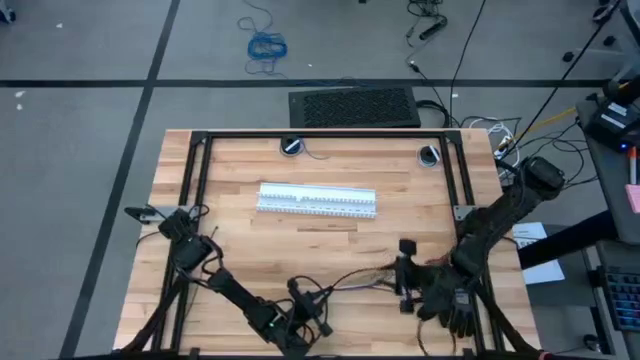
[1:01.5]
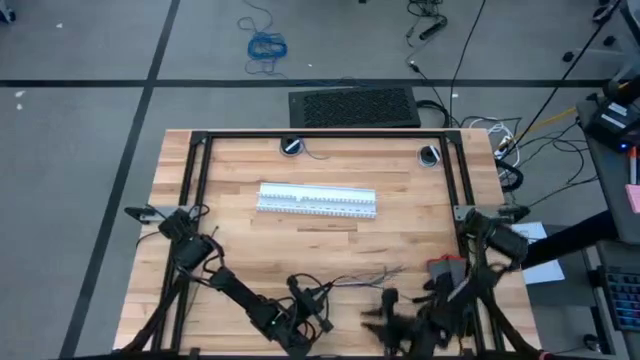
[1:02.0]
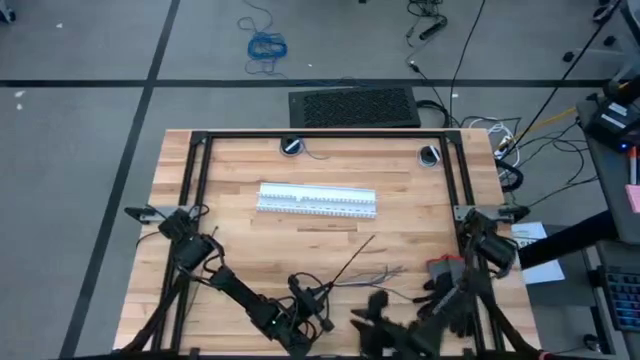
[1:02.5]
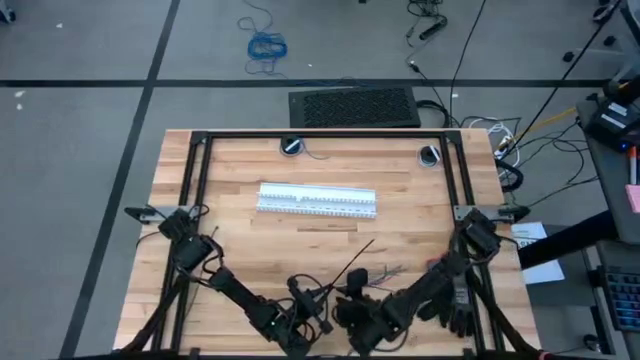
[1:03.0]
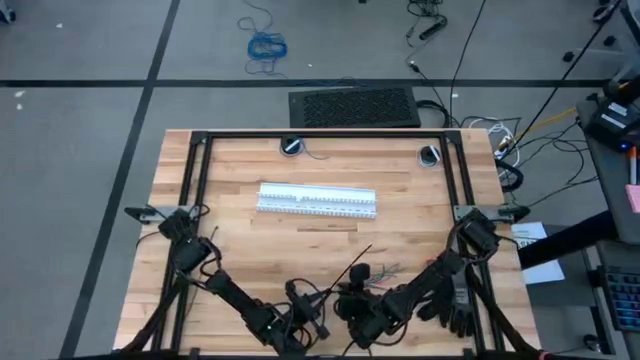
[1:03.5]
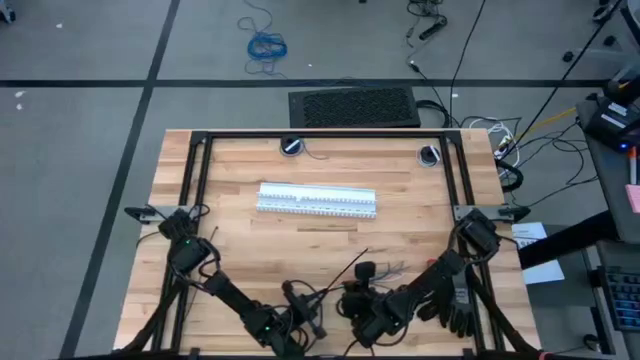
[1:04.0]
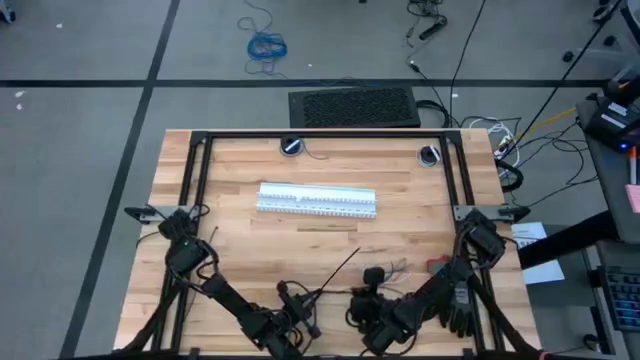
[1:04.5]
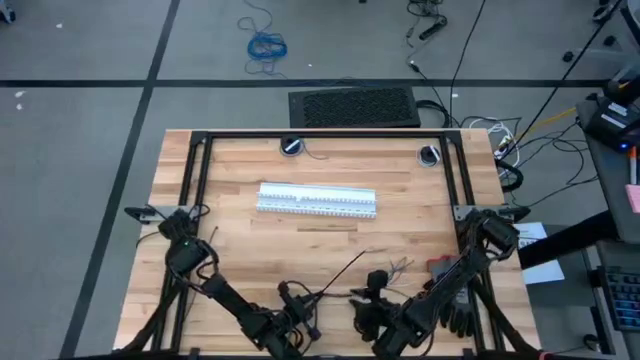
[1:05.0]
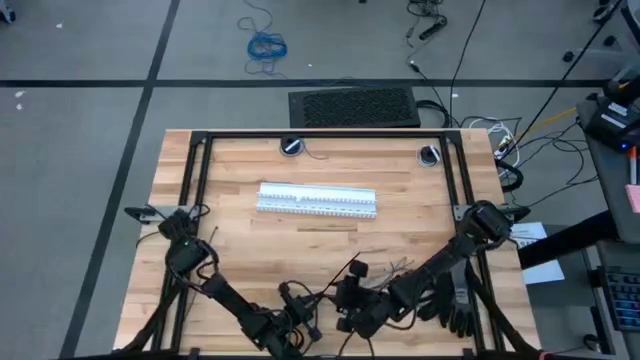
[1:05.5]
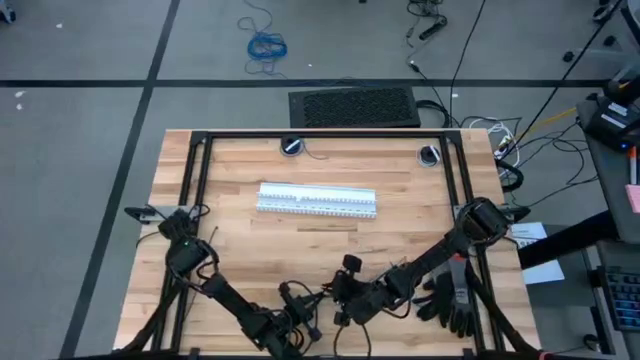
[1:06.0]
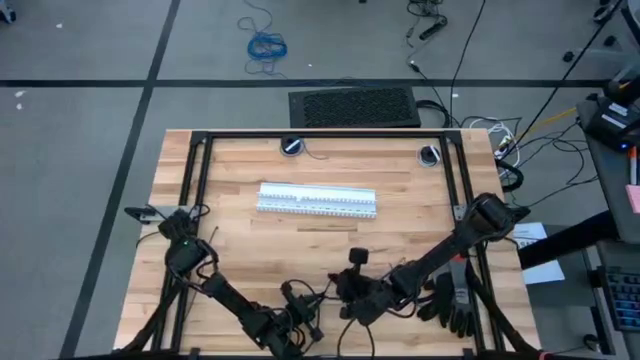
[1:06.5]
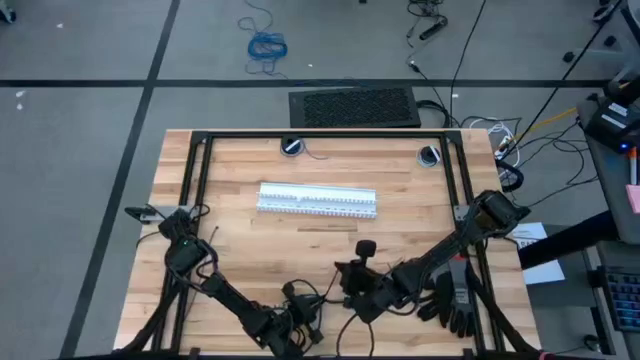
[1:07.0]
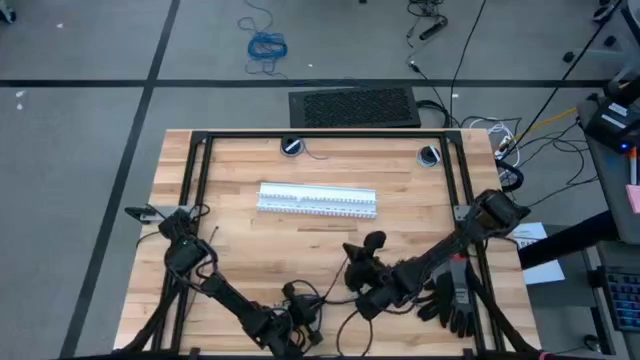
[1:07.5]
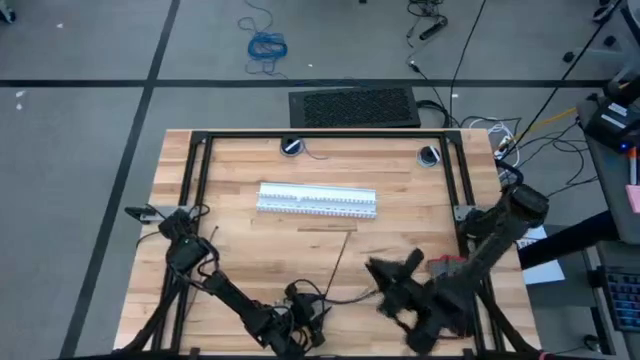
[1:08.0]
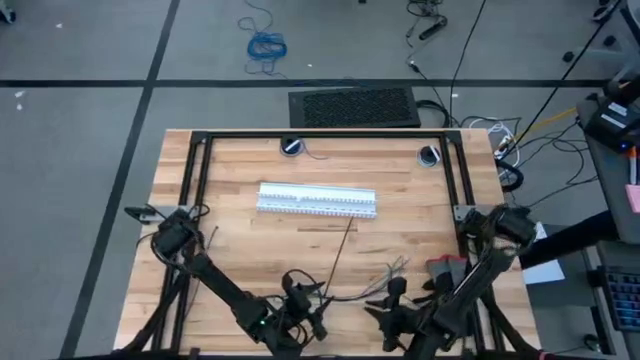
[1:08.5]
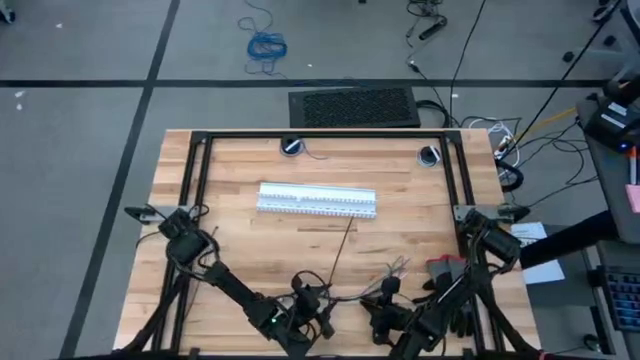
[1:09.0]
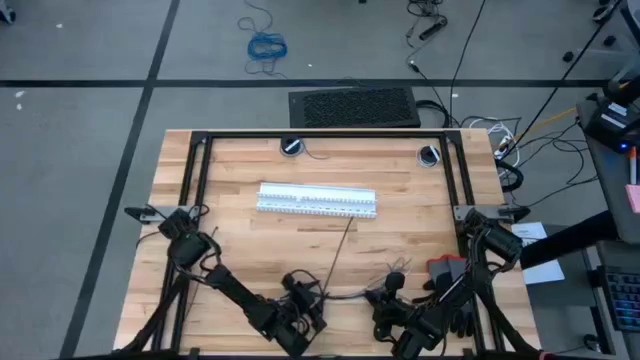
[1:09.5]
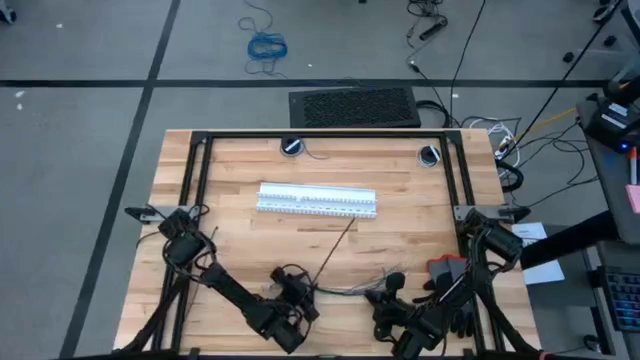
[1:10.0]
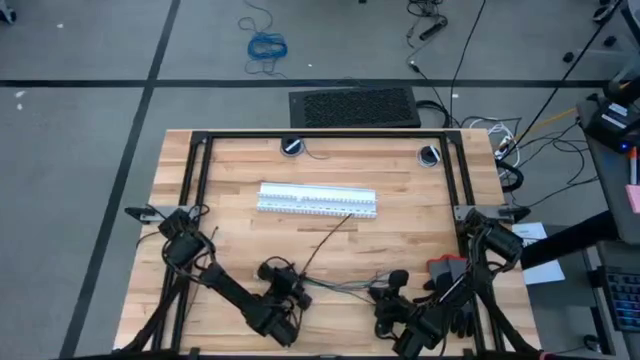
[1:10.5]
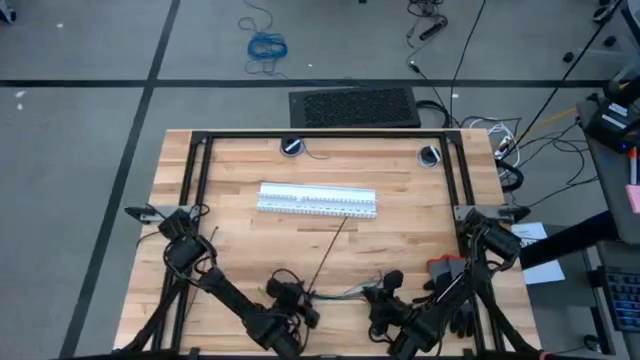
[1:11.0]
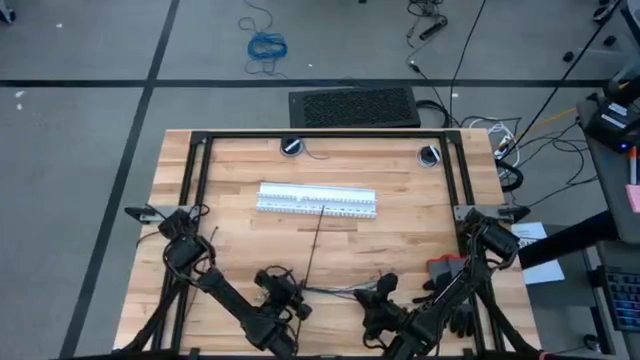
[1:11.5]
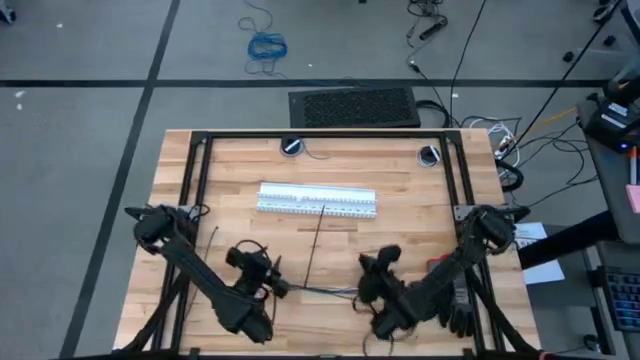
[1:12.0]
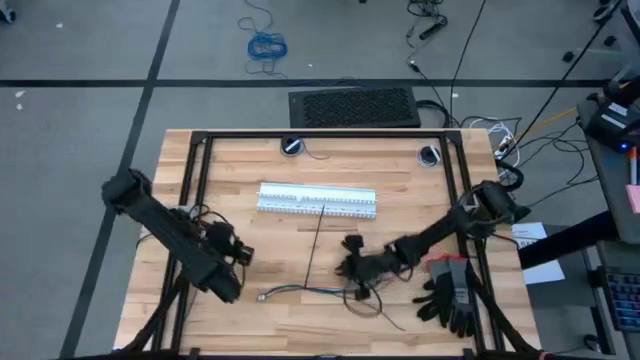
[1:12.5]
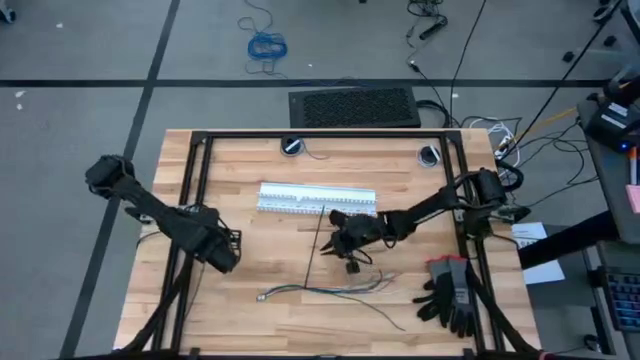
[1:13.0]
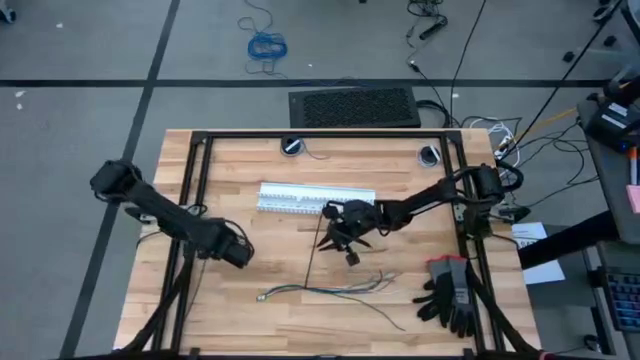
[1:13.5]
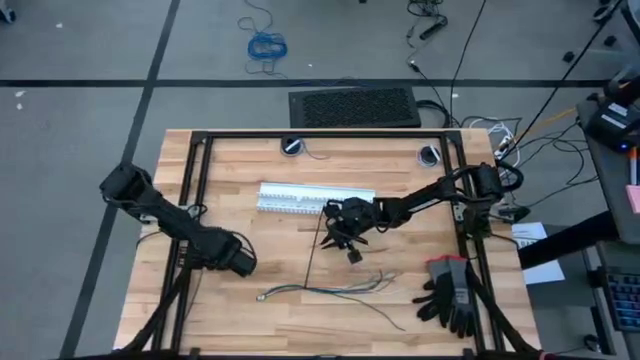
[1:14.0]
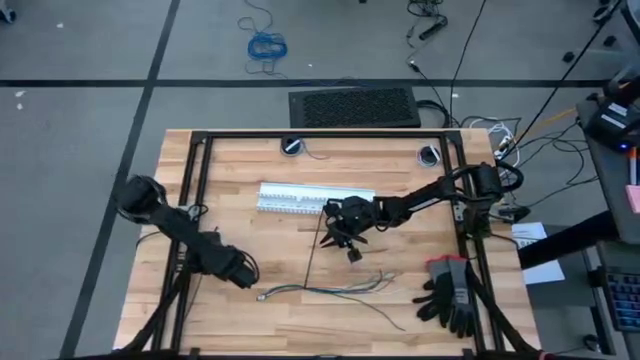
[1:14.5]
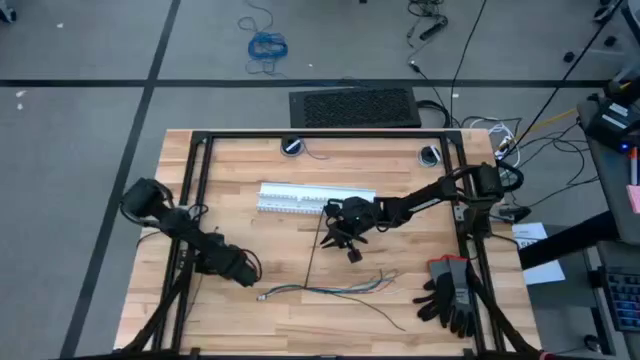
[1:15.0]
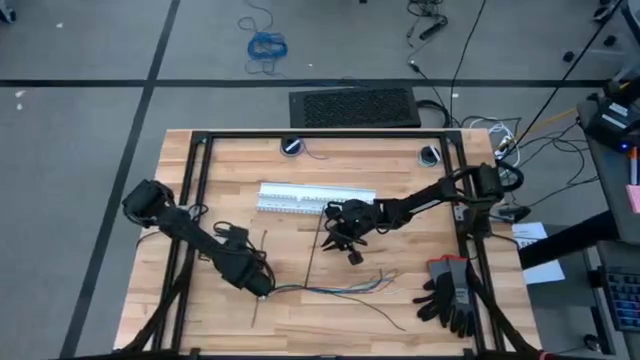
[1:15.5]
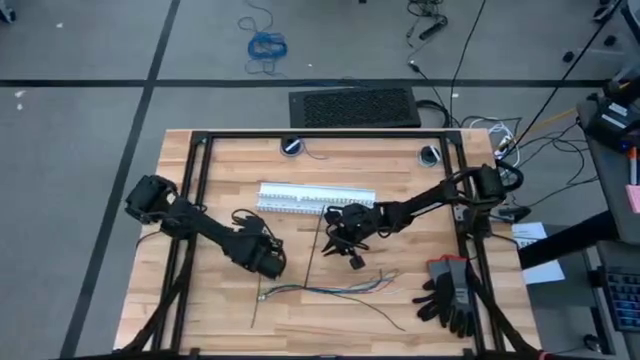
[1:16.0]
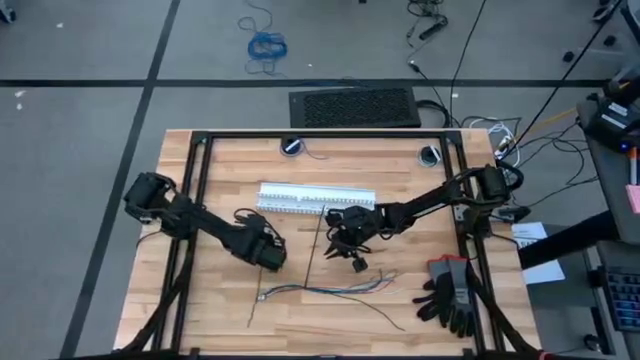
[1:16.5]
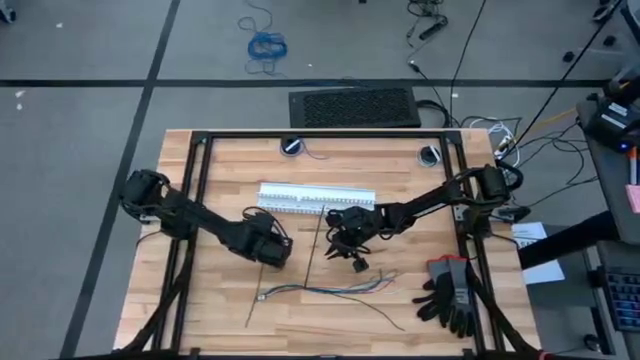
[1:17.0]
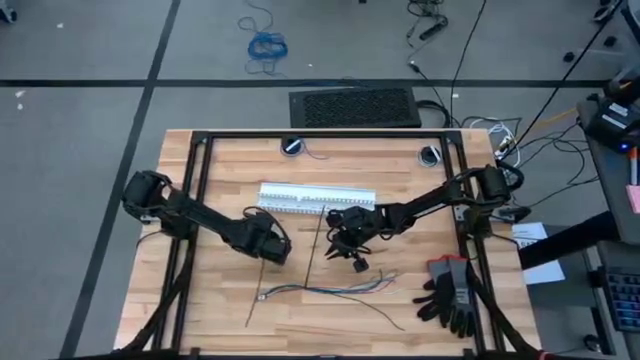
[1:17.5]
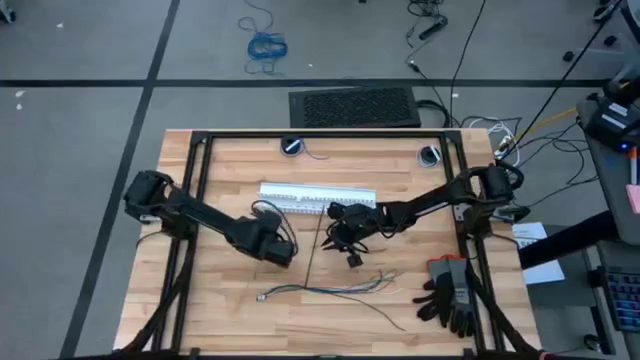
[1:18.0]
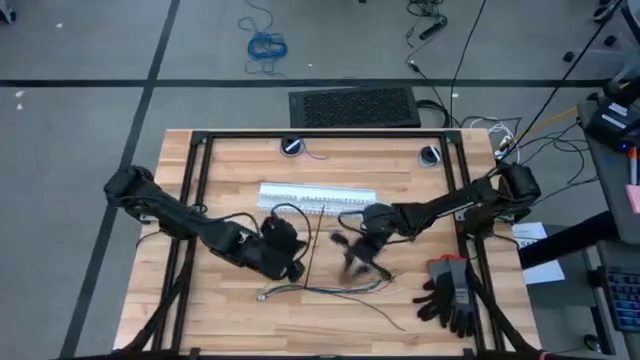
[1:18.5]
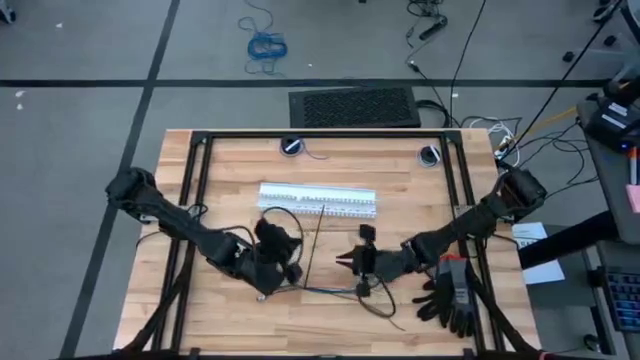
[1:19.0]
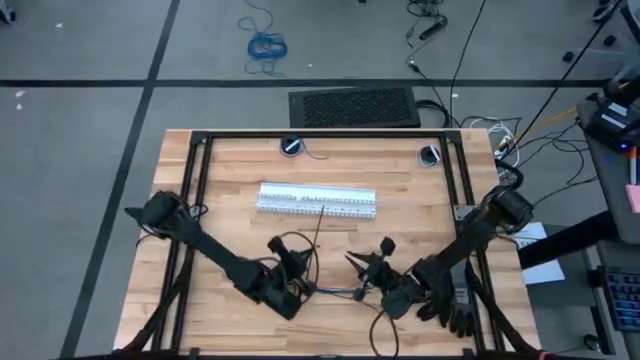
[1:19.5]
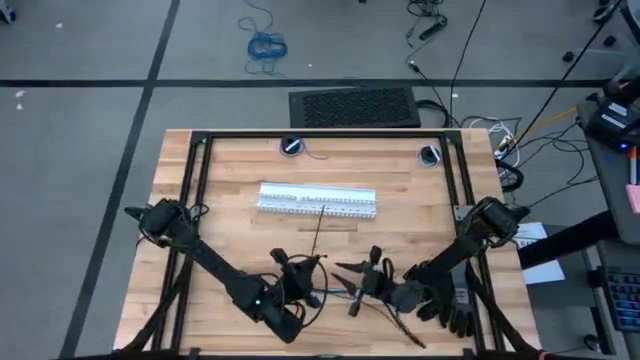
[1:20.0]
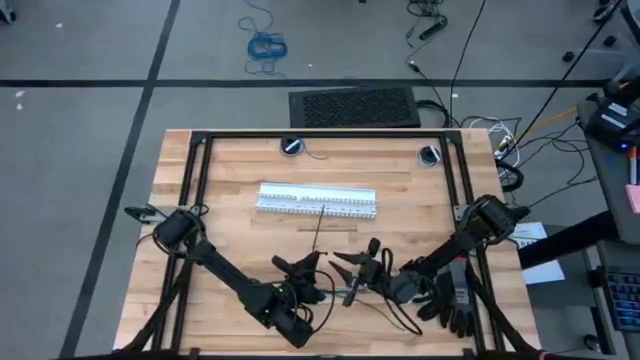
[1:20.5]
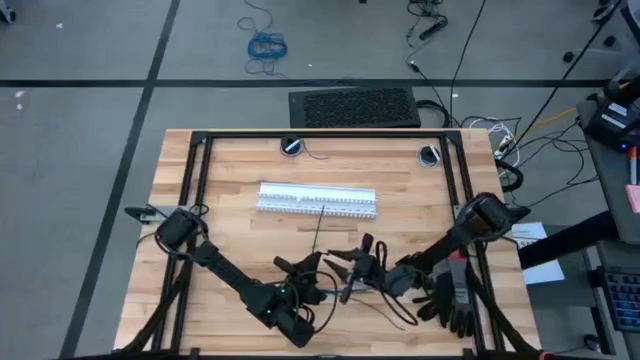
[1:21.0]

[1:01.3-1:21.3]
Task: Ziptie cables
Wrap the cables together using a zip tie

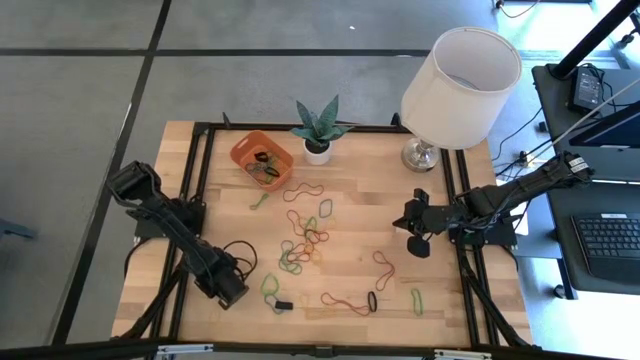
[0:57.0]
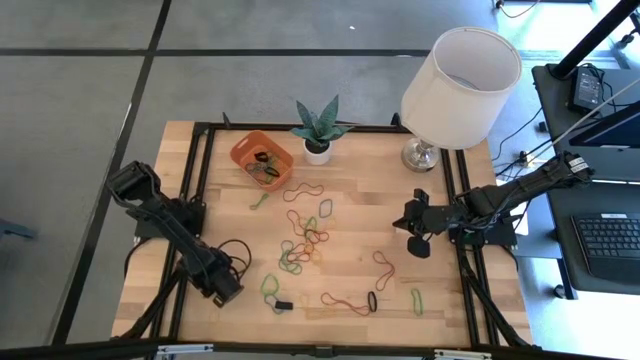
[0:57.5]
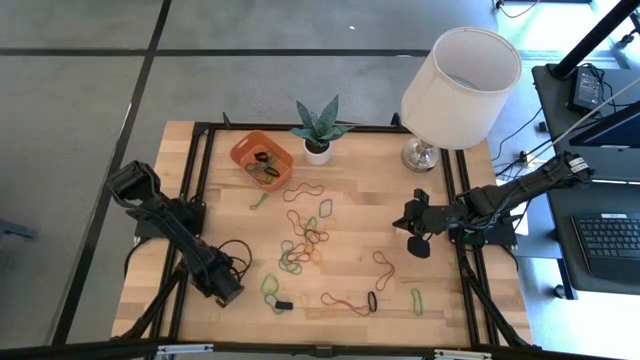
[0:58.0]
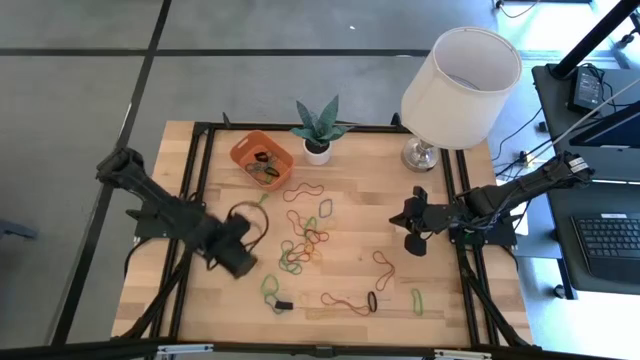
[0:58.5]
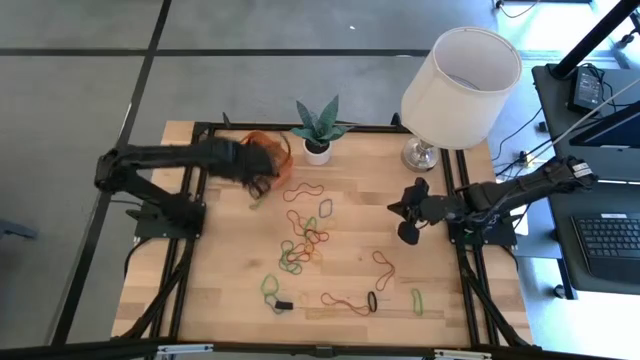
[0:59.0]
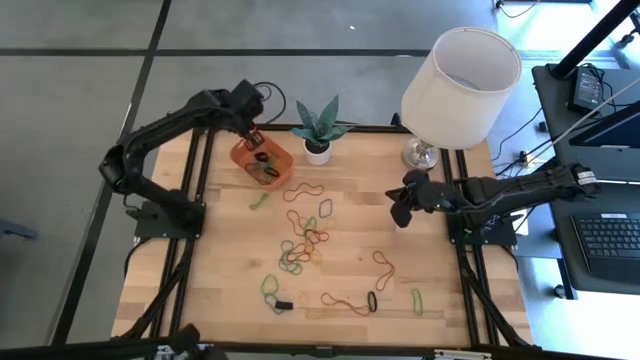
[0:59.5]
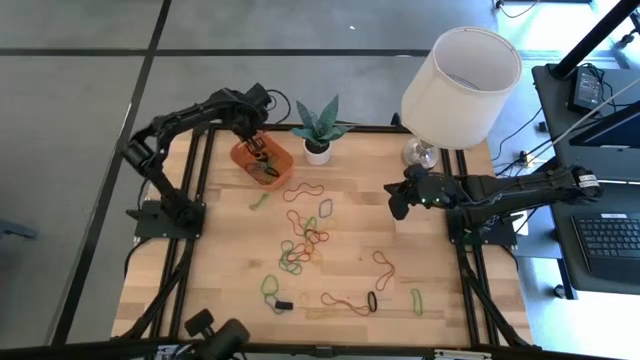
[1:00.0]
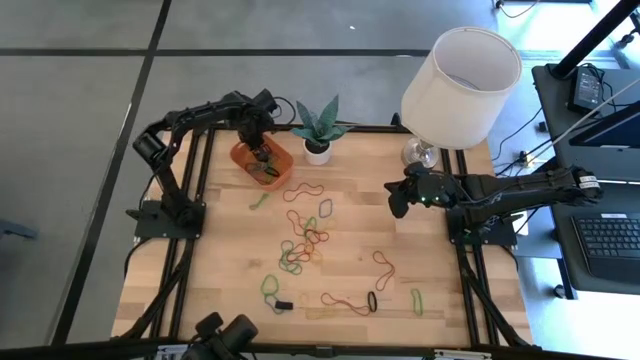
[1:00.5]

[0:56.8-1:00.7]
Task: Pick and place rubber bands into bin
Put the yellow rubber band into the orange bin
